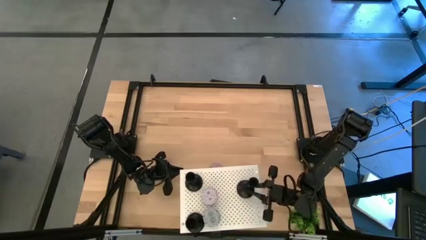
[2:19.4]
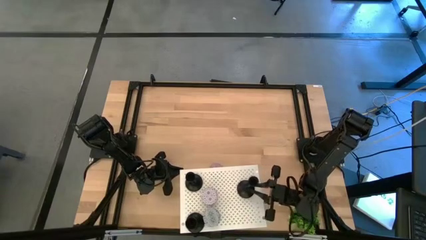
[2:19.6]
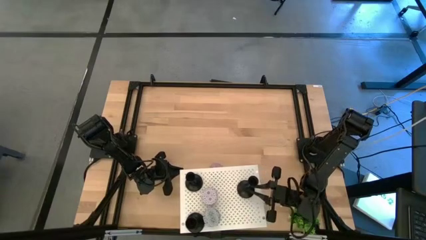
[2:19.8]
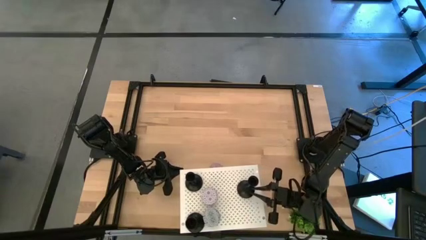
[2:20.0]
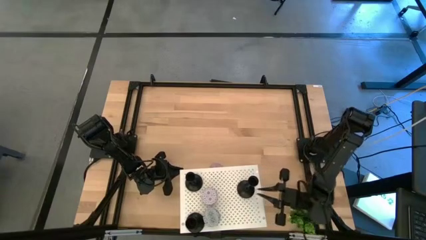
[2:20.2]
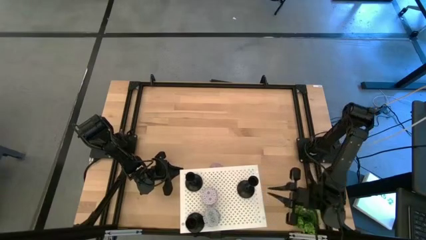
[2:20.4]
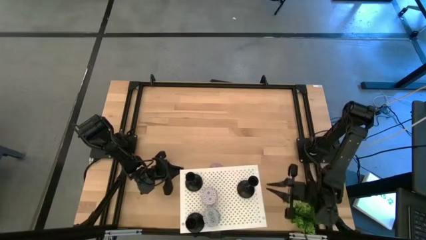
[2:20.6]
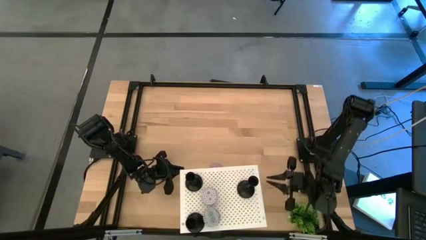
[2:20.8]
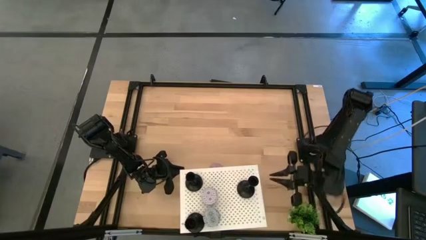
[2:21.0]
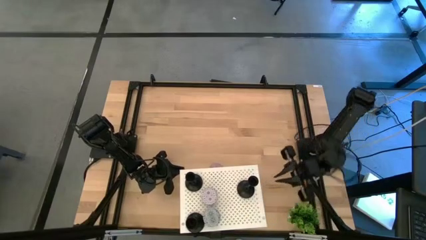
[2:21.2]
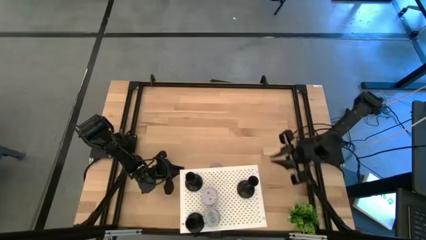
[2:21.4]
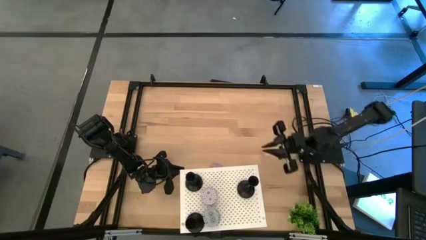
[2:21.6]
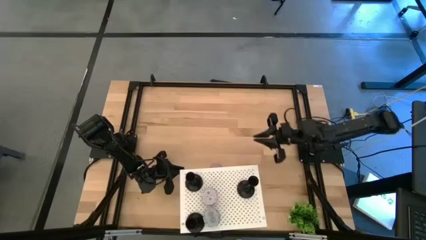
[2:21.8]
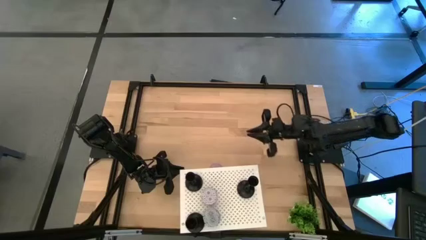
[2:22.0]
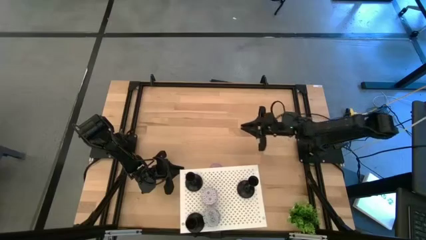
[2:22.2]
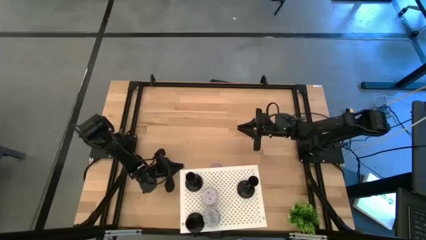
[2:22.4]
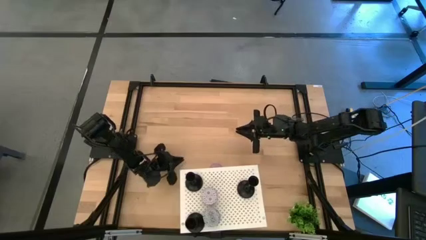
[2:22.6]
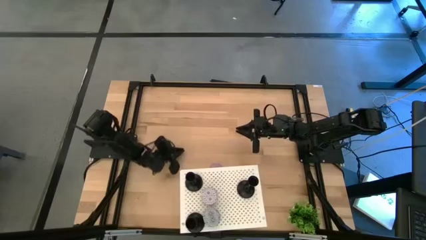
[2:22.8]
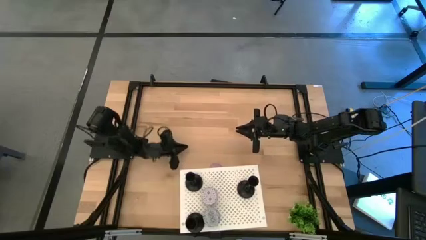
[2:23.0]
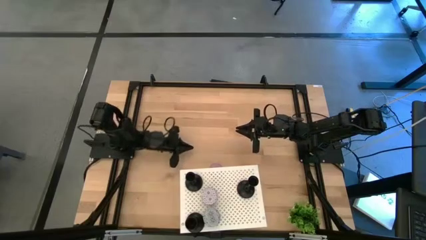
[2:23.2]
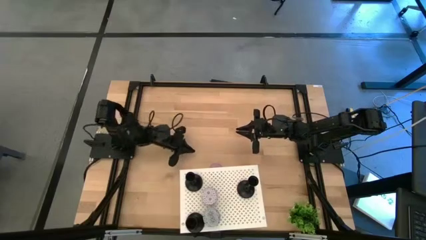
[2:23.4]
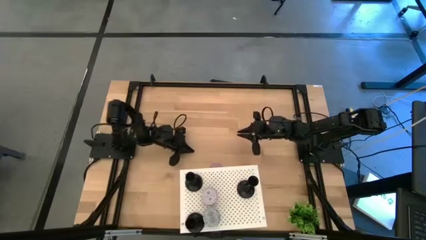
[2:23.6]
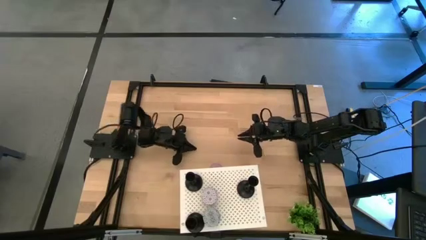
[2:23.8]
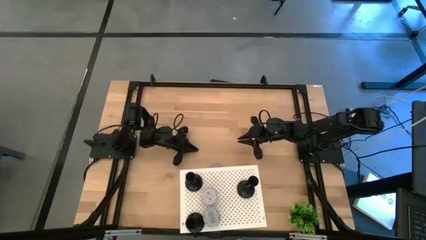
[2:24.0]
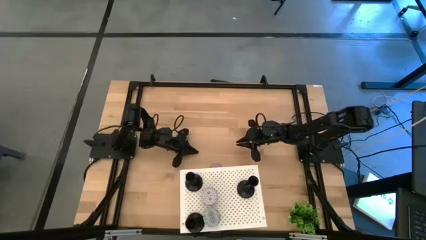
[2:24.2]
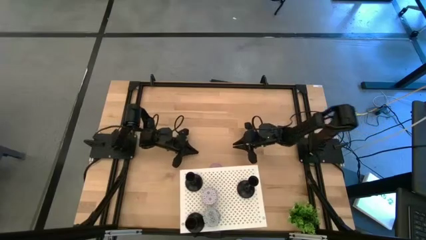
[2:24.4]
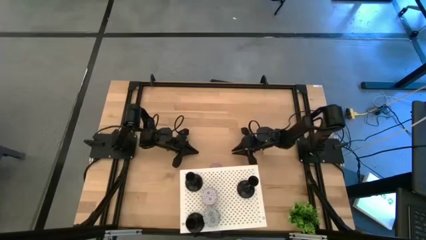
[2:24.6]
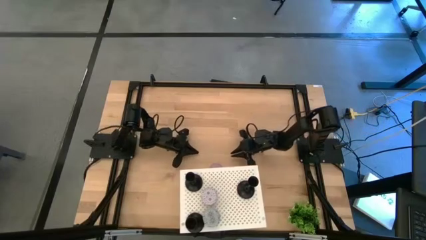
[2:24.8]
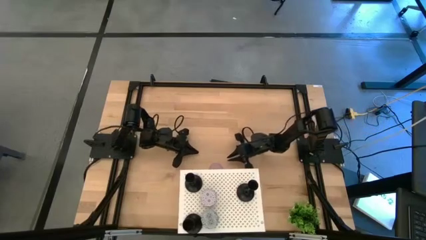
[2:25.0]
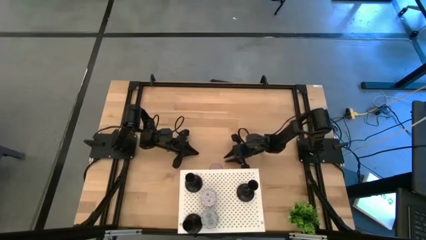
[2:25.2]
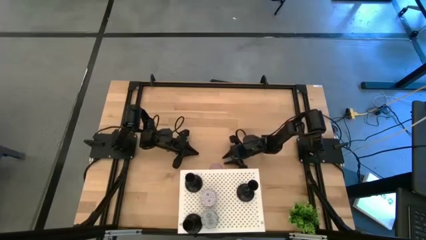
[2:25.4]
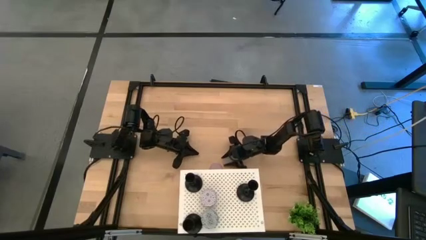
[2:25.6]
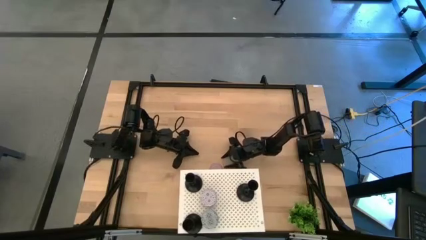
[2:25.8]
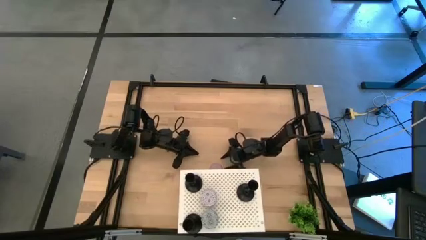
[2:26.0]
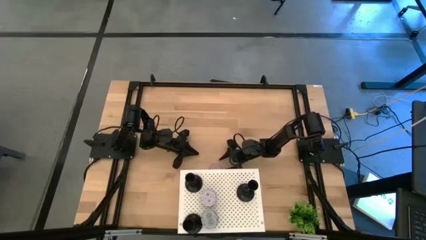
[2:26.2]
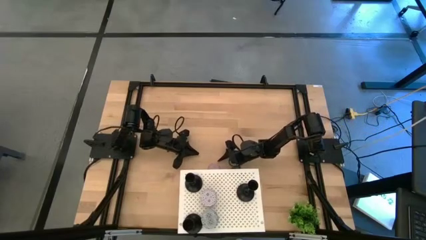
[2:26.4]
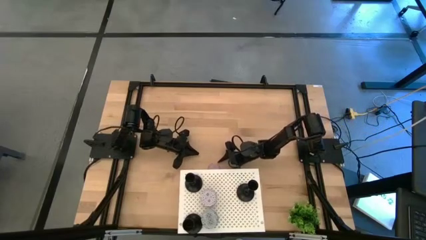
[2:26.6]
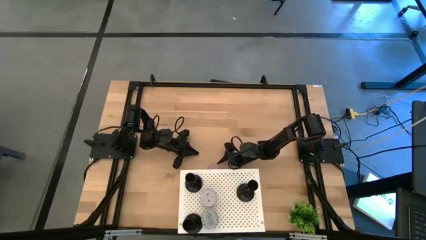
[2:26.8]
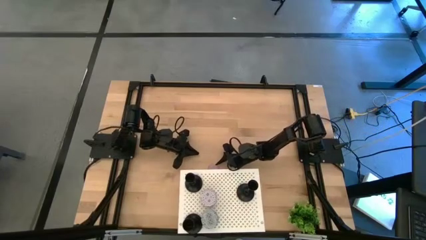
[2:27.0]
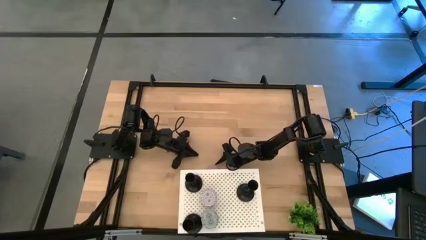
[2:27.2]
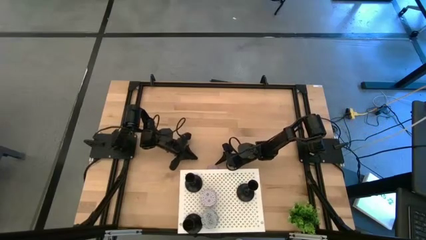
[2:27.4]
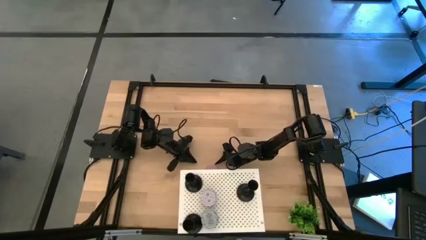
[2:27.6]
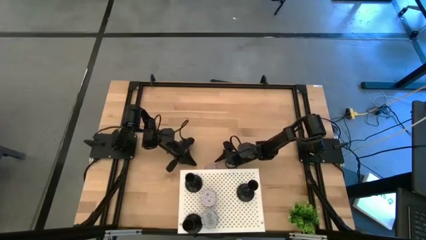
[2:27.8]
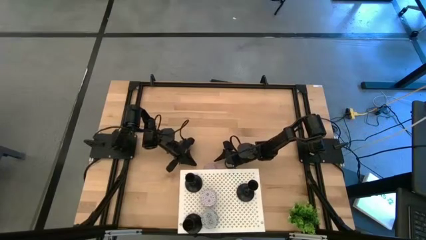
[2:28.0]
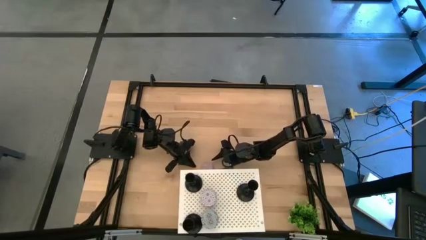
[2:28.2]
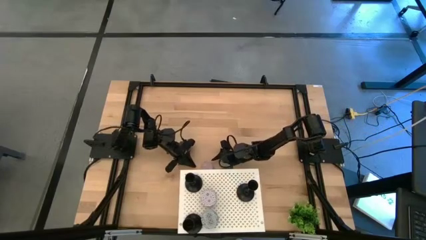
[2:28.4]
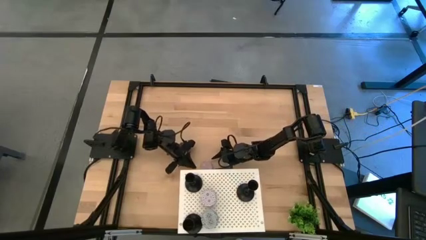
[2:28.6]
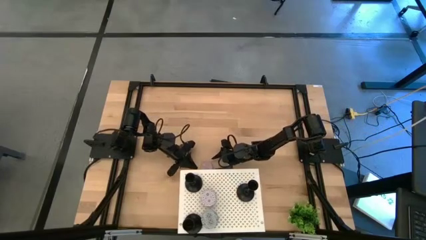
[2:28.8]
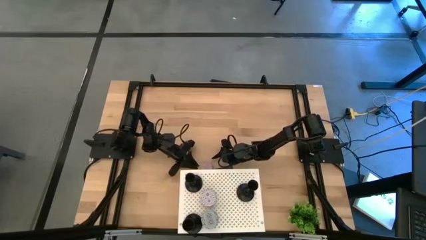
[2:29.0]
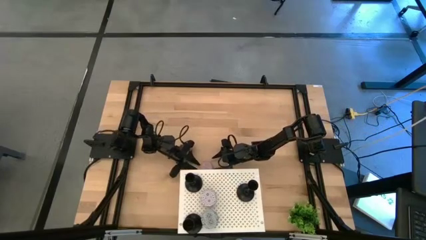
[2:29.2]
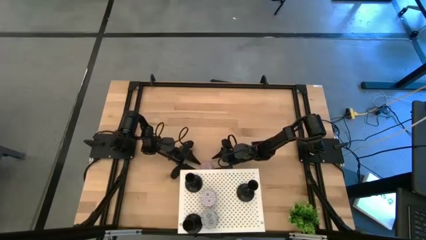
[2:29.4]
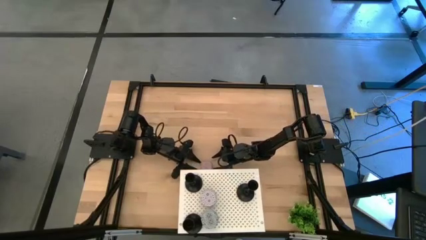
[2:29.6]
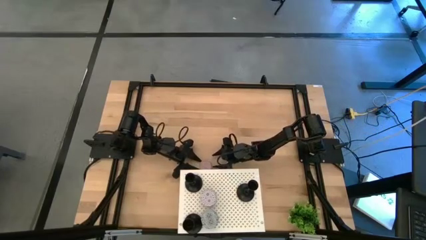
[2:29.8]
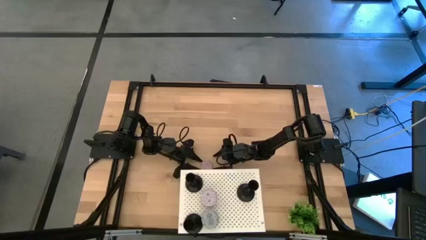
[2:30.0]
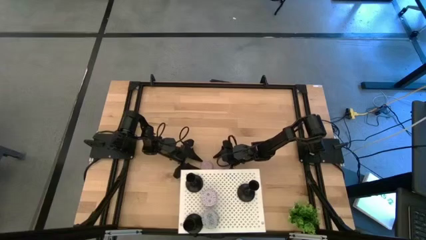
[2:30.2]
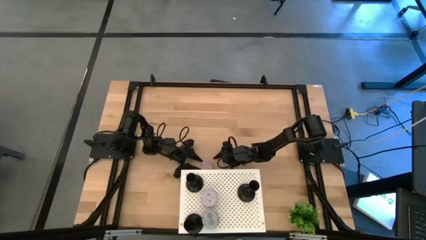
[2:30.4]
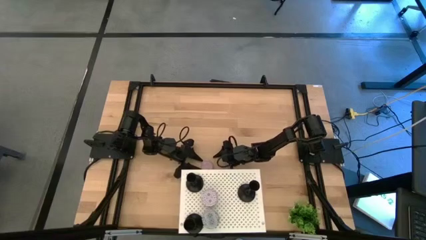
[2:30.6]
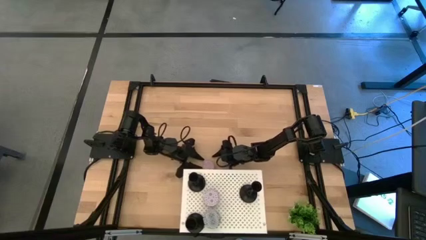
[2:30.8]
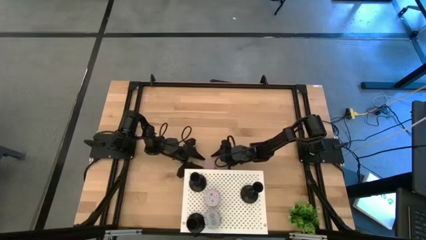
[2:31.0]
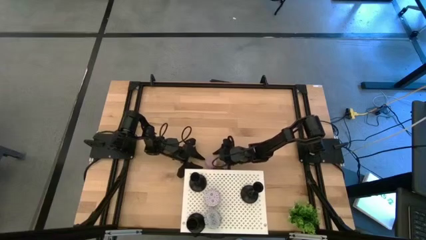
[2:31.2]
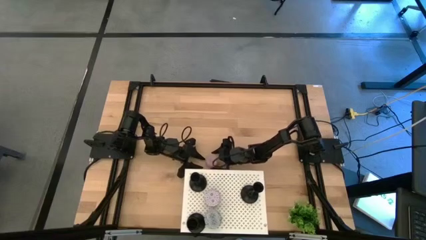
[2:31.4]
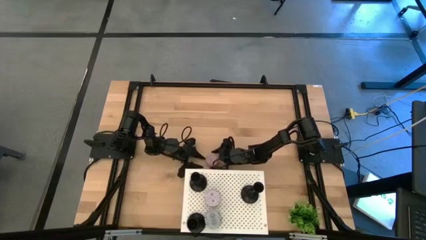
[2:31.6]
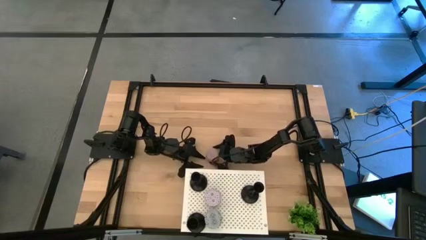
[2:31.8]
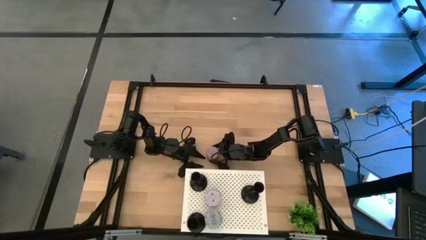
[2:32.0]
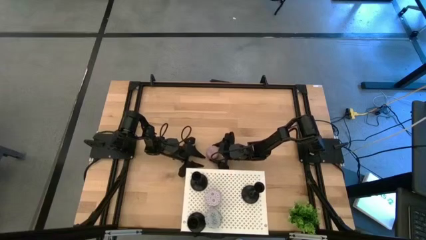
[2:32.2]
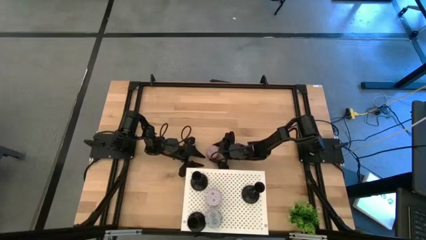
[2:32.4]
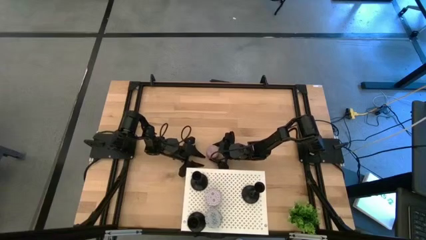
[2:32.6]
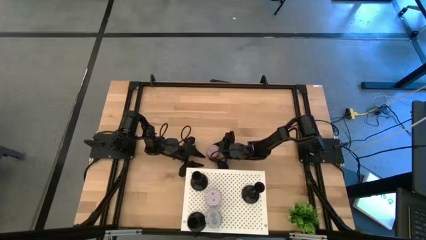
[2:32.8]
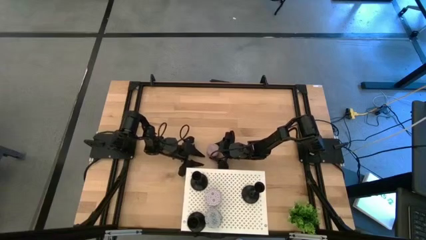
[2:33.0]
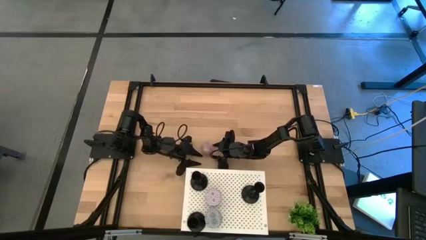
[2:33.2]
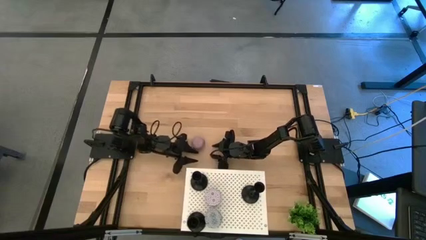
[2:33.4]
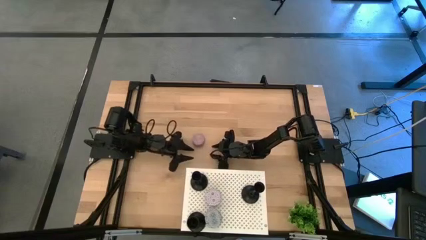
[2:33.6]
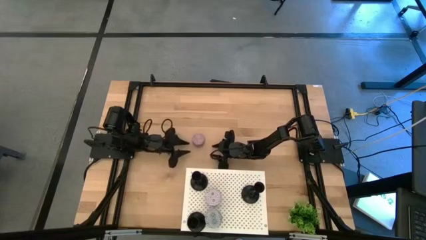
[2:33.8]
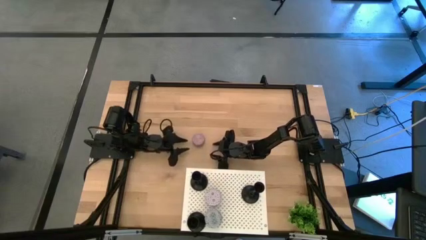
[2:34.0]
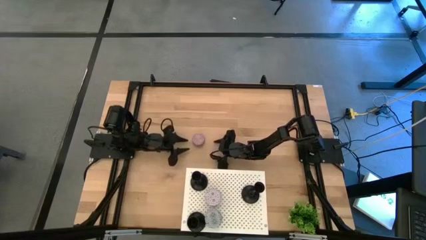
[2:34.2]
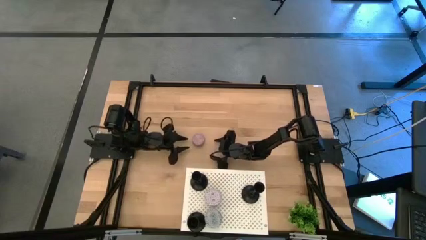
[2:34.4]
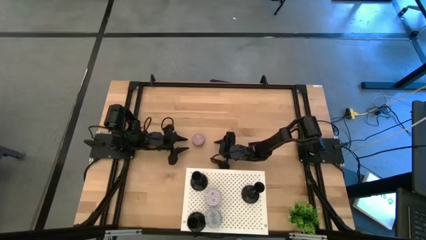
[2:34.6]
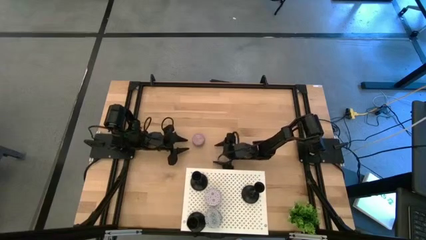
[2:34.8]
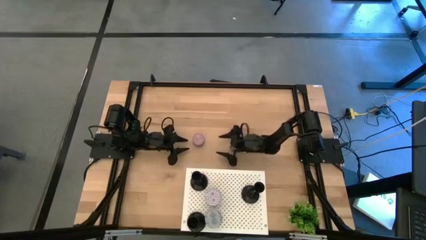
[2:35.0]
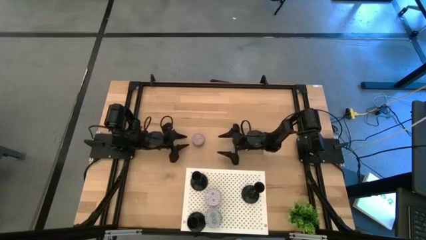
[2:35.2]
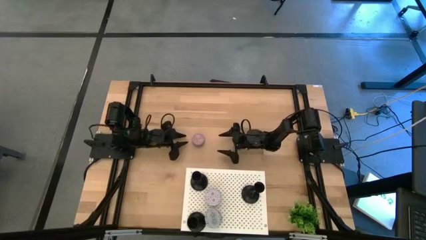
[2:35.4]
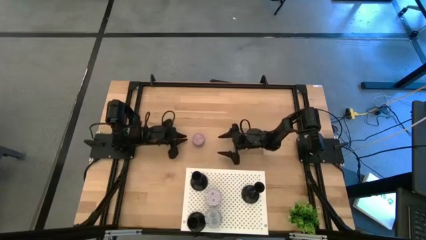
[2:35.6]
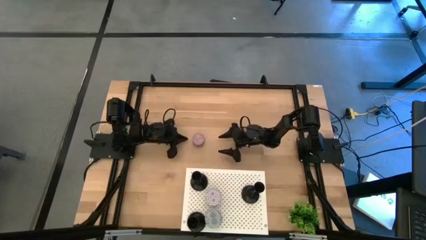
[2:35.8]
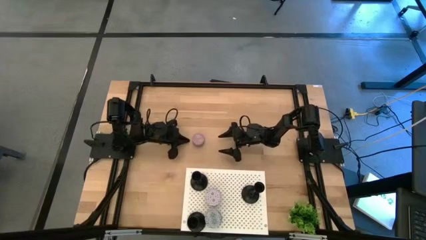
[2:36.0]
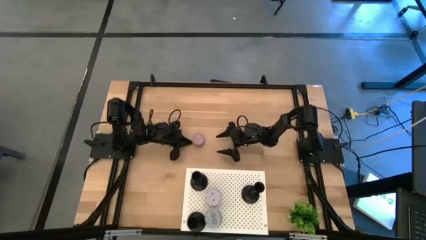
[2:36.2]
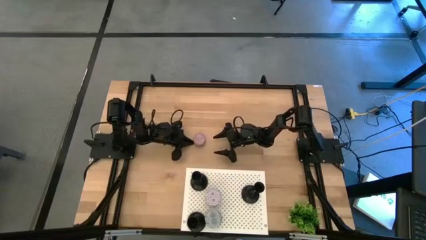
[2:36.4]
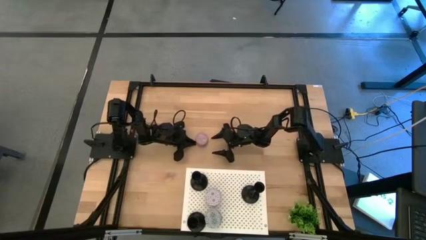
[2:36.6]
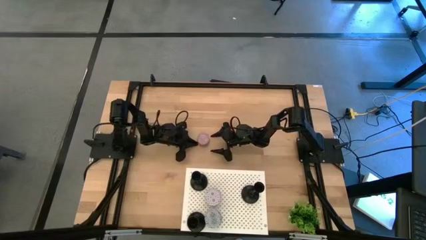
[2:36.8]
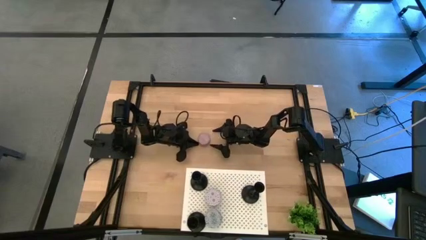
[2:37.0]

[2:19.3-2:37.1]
Task: Pick & Place candle stick holders
Put the scented candle on the shelf
